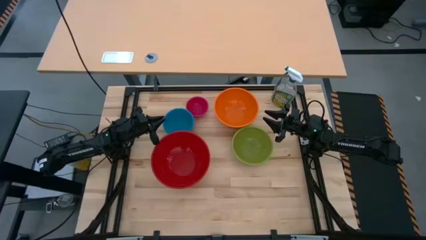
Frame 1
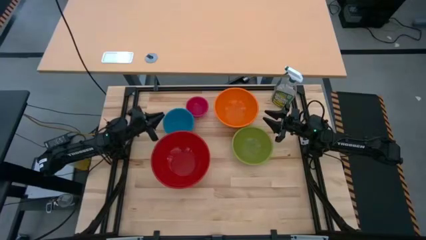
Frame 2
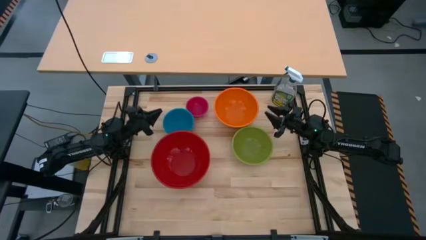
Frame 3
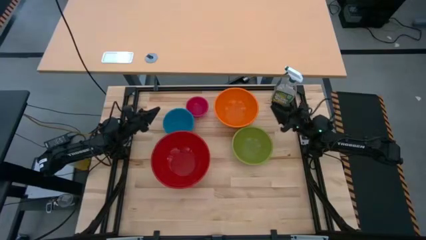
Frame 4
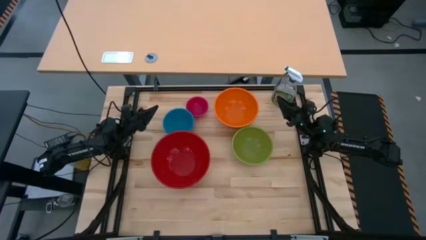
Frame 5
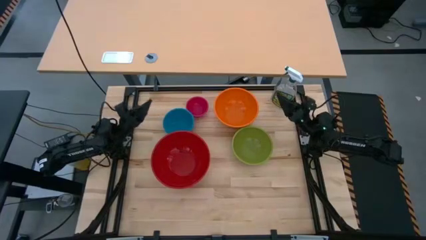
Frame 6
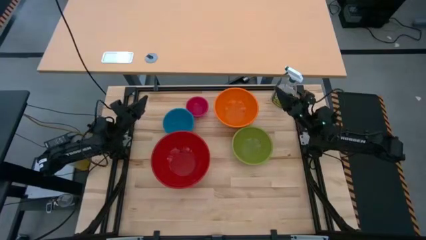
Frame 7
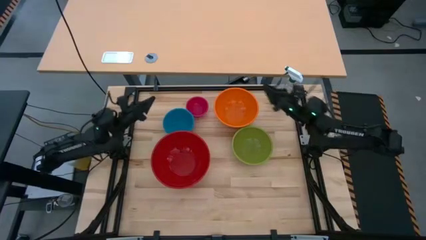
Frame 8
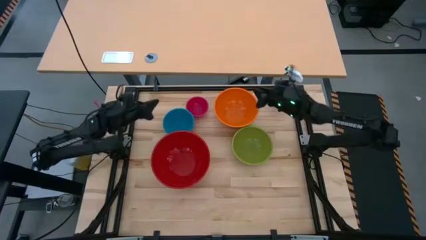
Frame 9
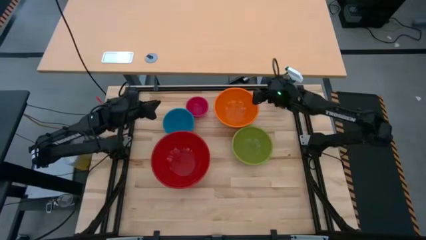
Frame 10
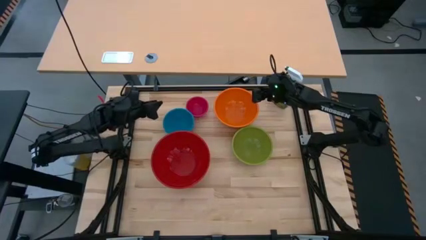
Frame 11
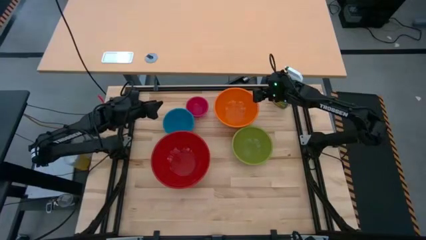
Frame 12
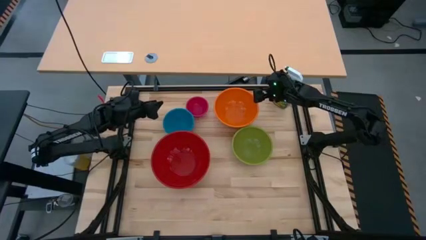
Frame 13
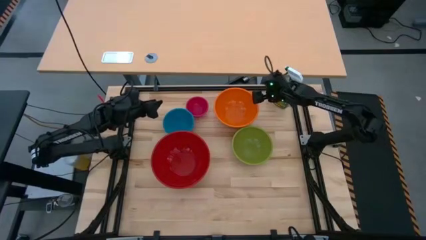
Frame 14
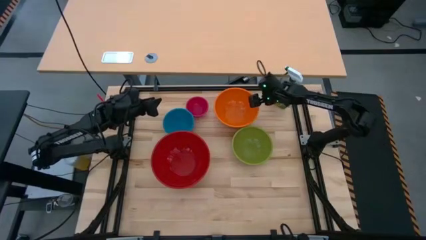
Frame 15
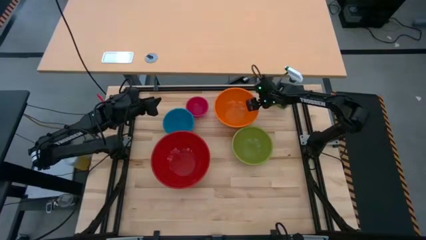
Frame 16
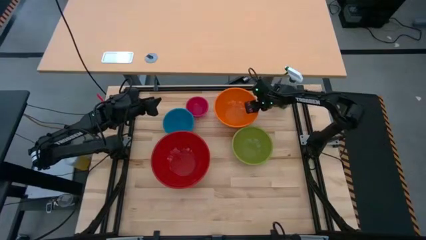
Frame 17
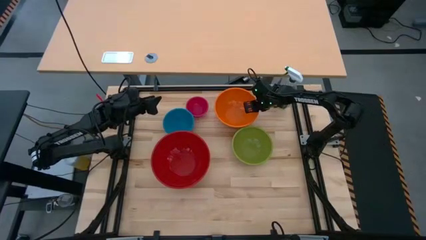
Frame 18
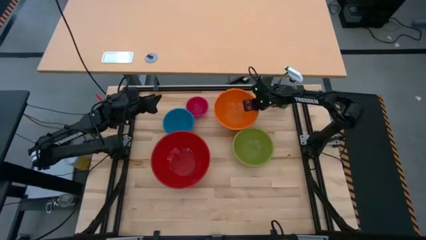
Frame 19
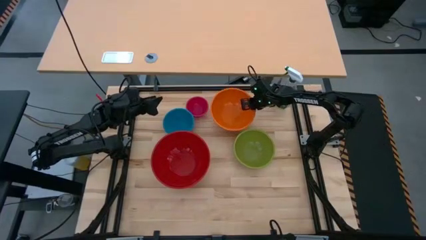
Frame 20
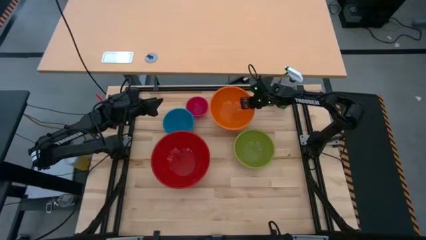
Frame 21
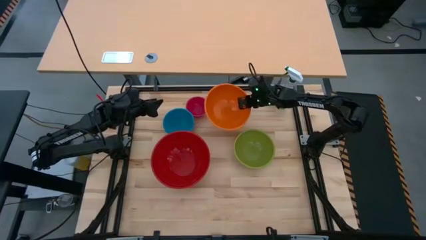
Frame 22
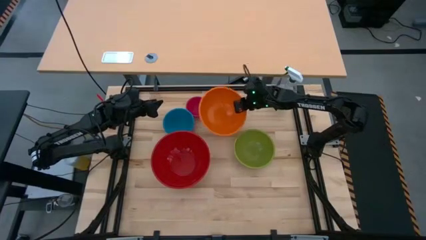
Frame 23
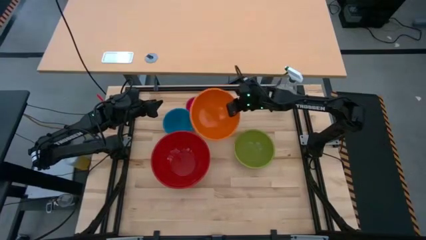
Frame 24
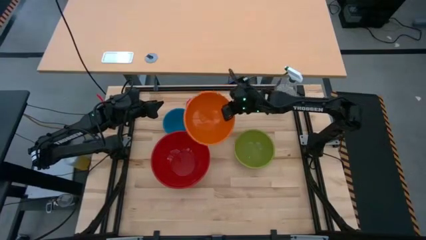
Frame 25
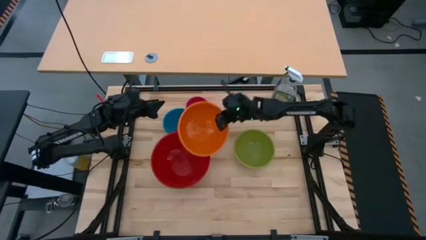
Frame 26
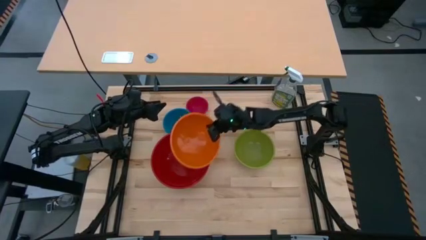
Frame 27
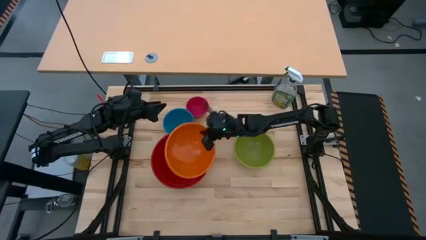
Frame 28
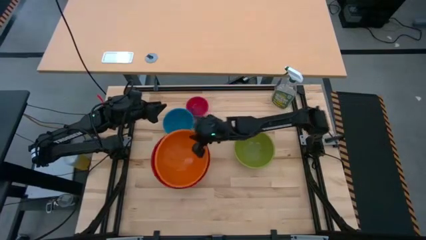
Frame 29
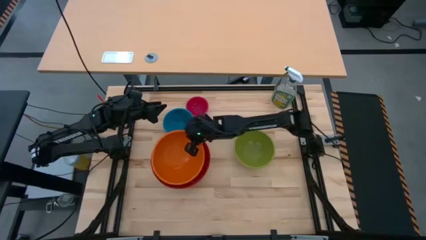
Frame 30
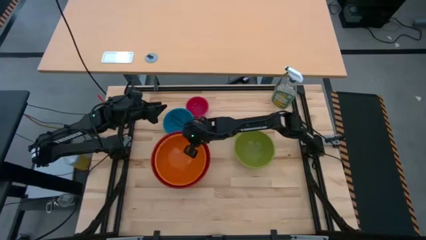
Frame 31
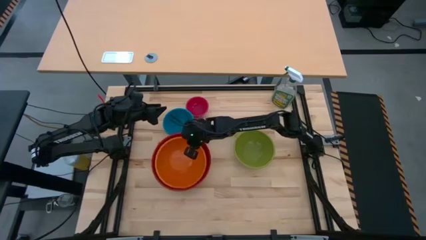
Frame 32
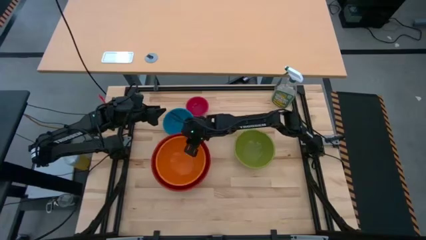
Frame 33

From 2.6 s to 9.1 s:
Stack the orange bowl on top of the red bowl

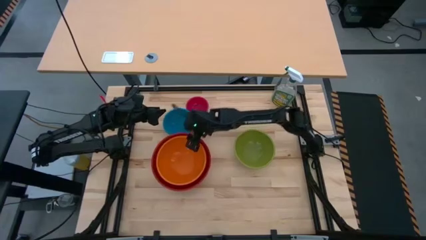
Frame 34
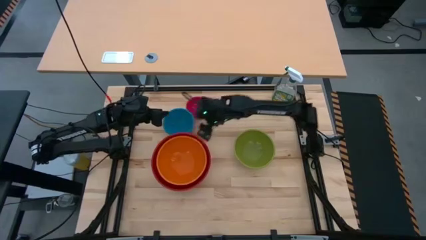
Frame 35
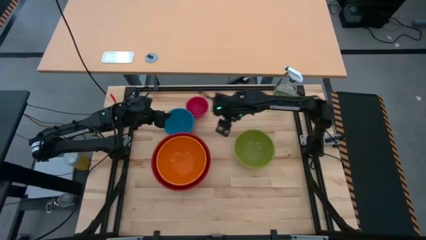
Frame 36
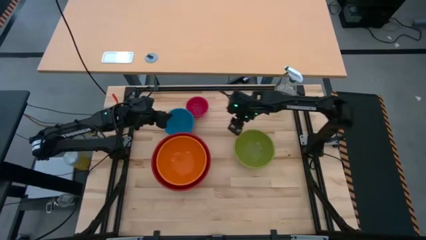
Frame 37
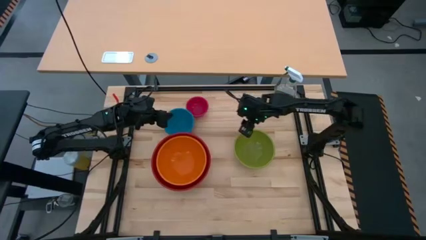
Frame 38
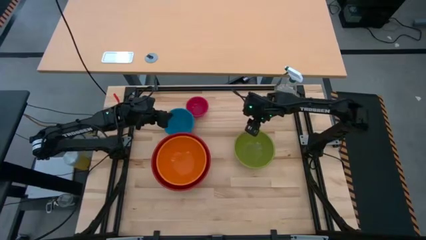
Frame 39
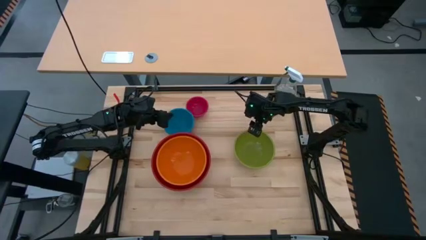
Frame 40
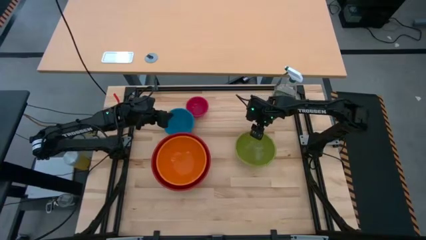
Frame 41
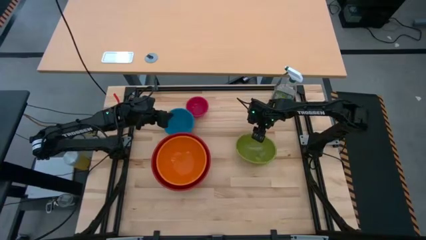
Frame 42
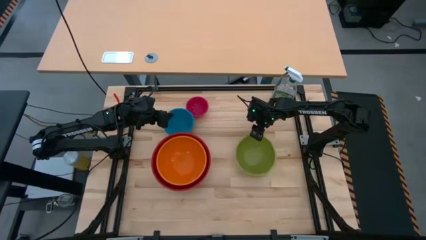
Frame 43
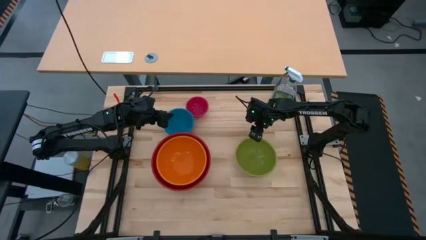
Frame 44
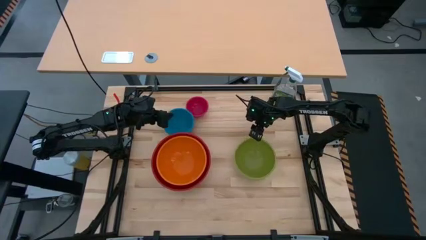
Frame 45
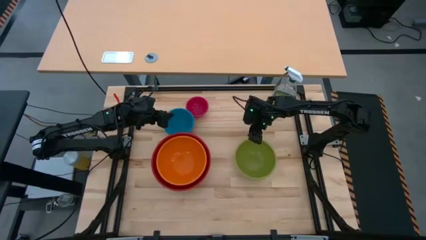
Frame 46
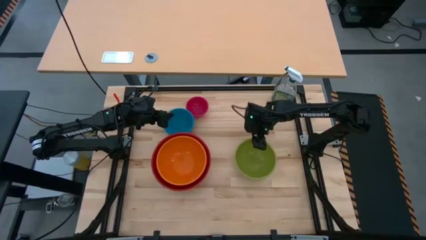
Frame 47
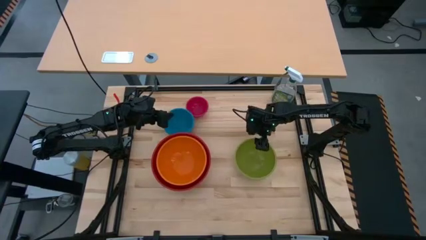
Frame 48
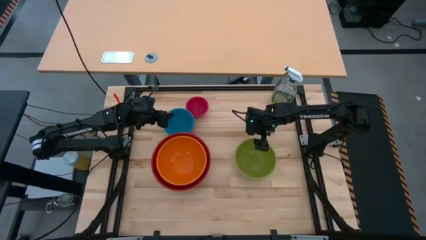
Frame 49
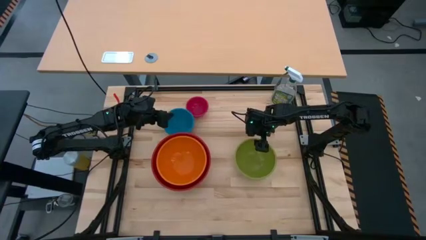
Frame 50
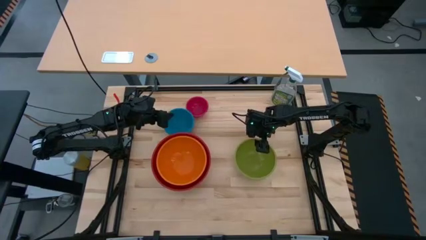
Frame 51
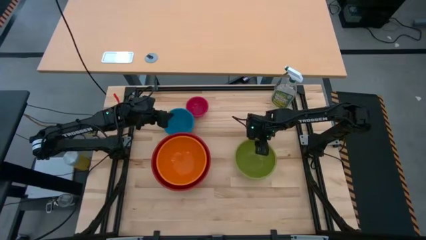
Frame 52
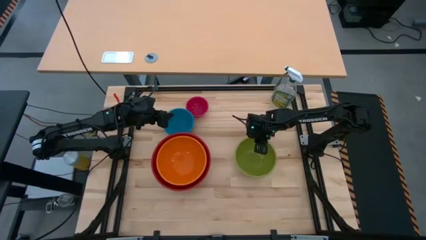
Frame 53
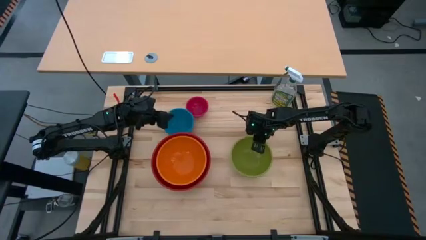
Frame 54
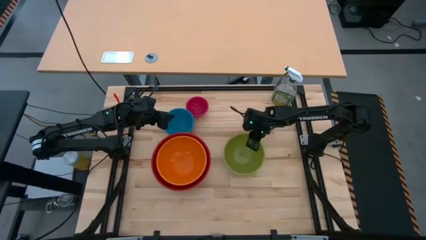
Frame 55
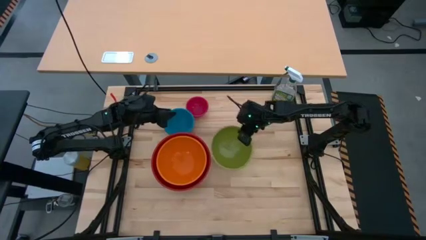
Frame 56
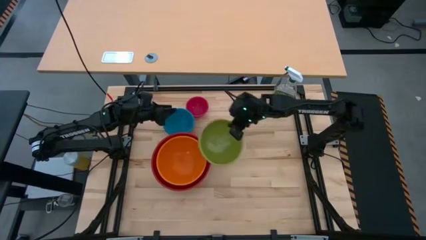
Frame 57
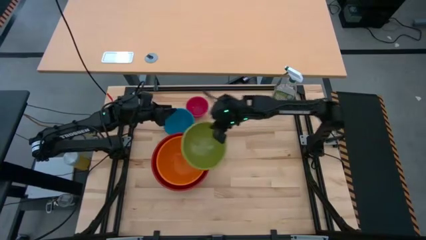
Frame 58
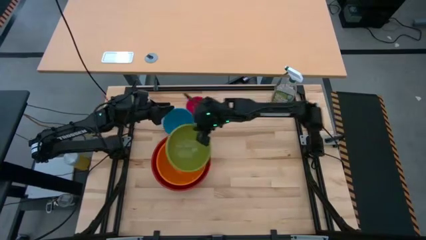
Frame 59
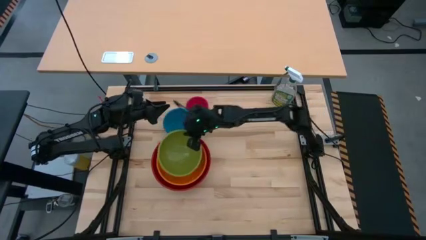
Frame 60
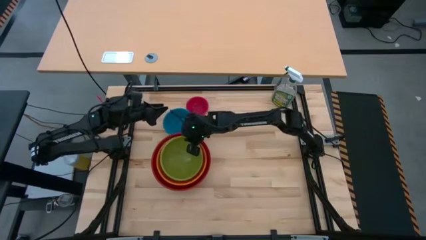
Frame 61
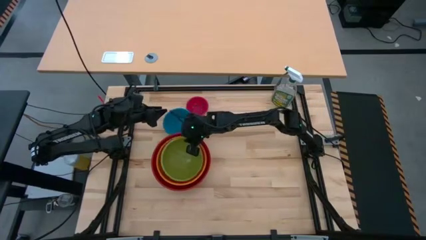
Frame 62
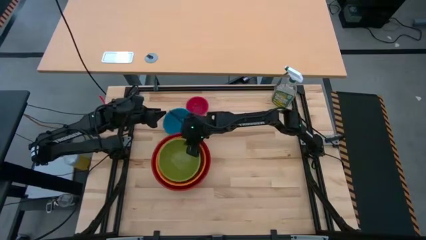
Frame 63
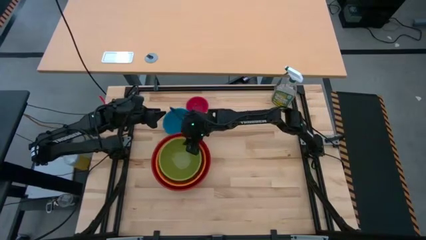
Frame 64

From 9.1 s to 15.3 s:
Stack the green bowl on top of the orange bowl

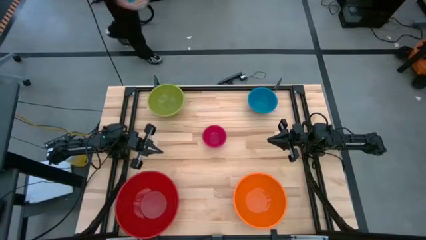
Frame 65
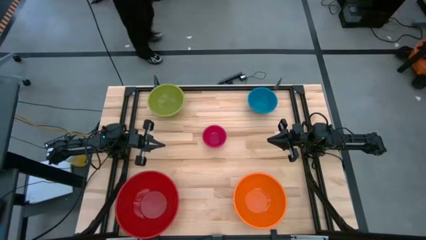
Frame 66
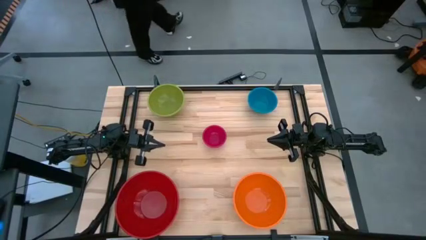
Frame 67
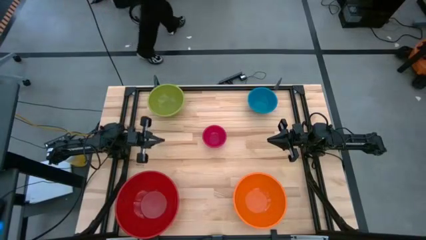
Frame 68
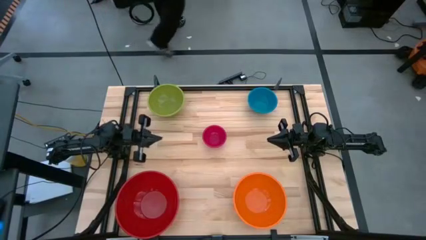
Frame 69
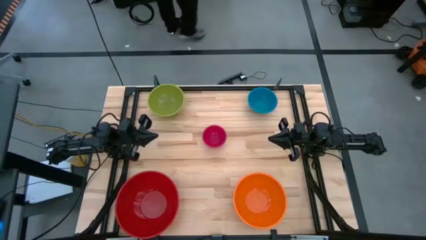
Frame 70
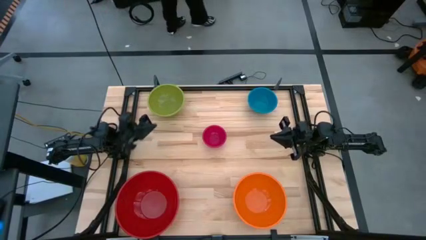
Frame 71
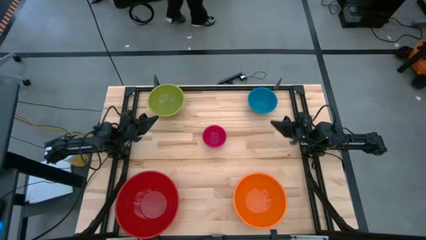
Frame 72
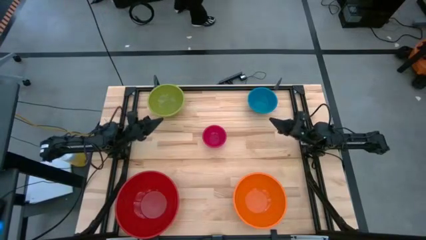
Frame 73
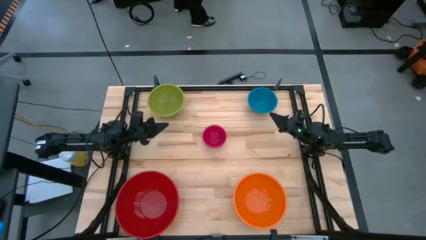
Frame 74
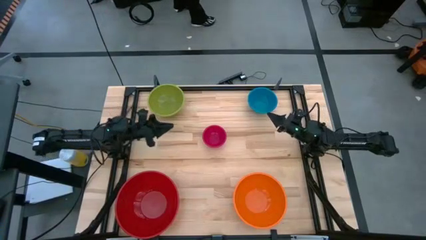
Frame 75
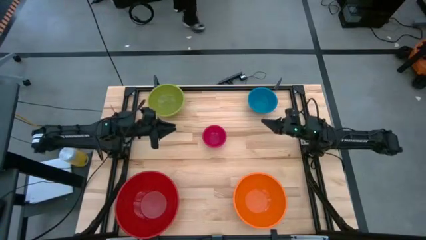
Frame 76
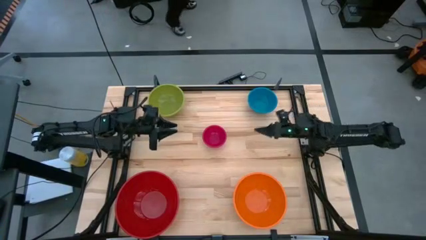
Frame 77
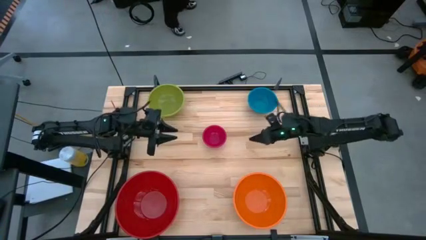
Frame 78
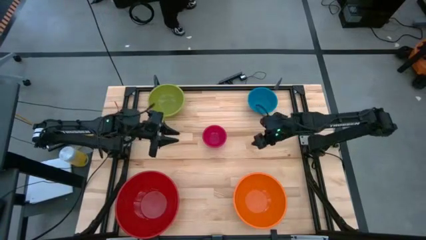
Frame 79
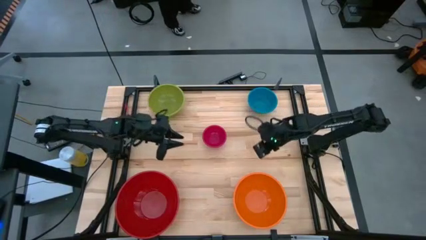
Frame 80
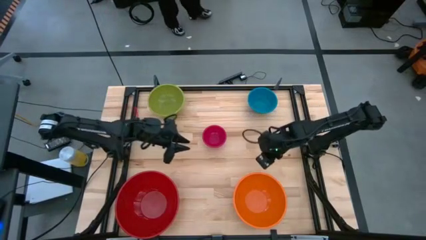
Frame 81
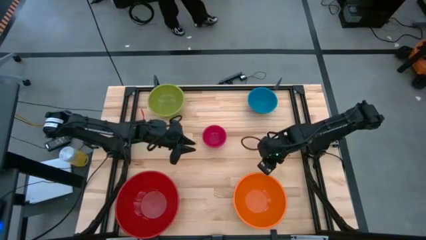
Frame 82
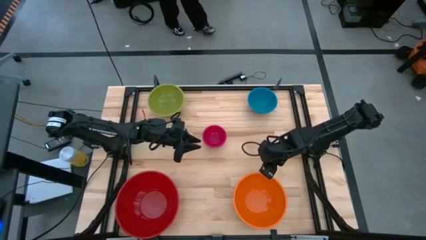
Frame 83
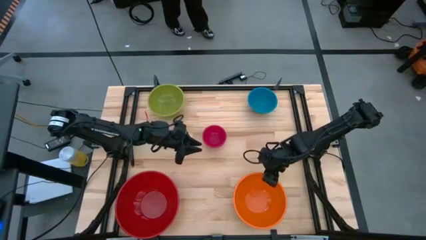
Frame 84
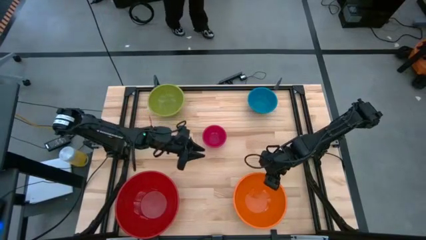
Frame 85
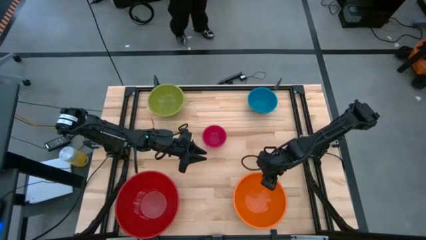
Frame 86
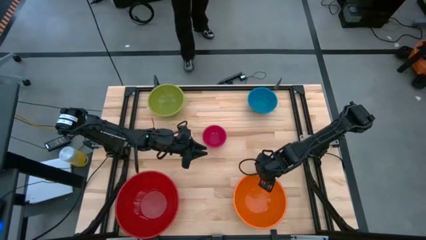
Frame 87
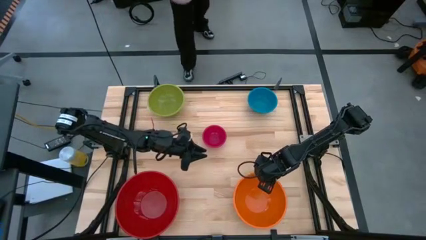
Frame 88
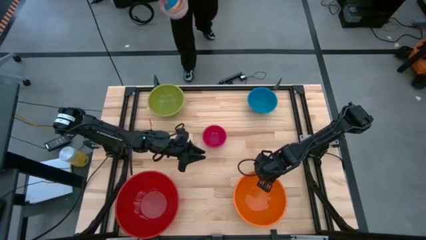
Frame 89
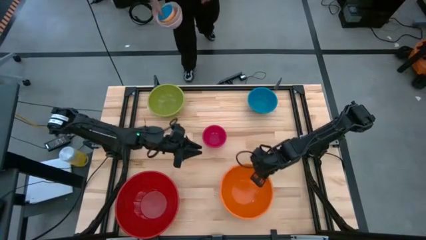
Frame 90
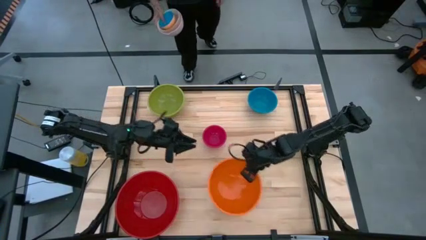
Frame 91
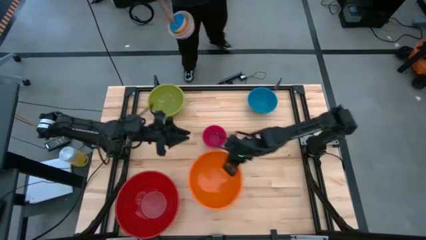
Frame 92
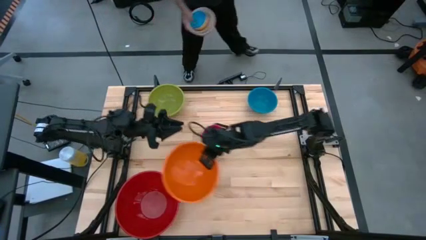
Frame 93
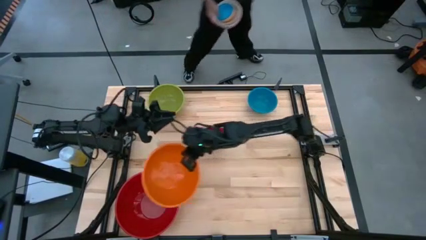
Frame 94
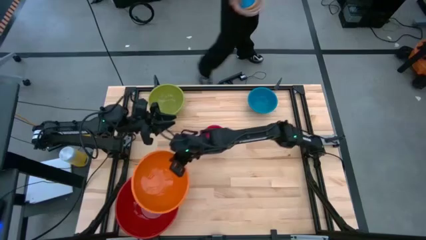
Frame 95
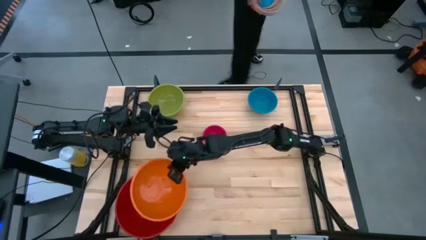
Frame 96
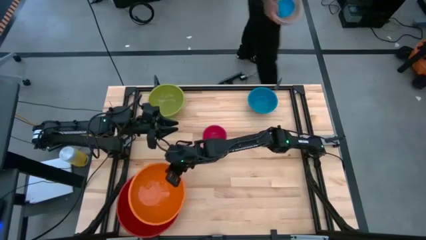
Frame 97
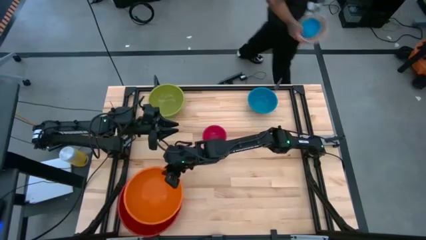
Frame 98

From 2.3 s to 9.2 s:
Stack the orange bowl on top of the red bowl
